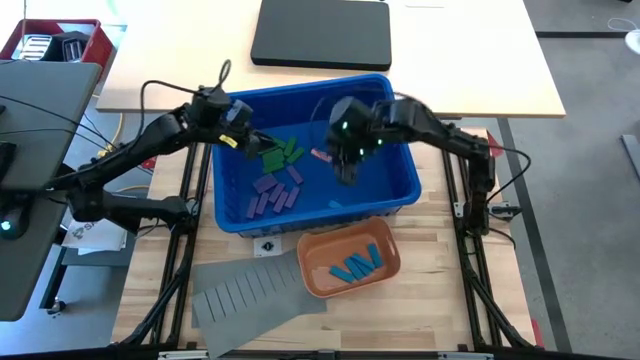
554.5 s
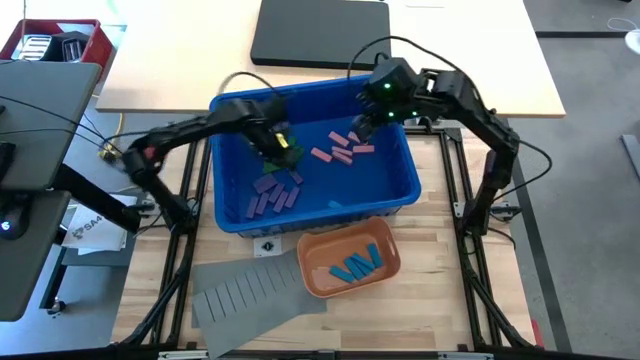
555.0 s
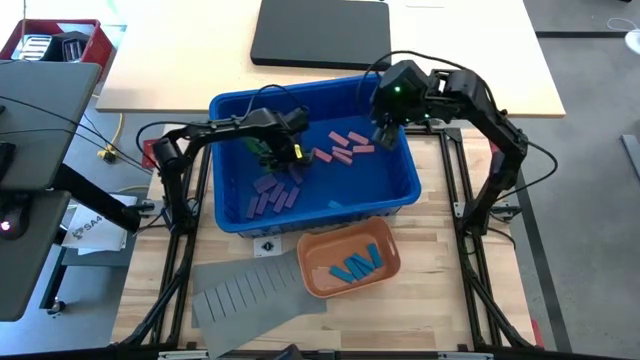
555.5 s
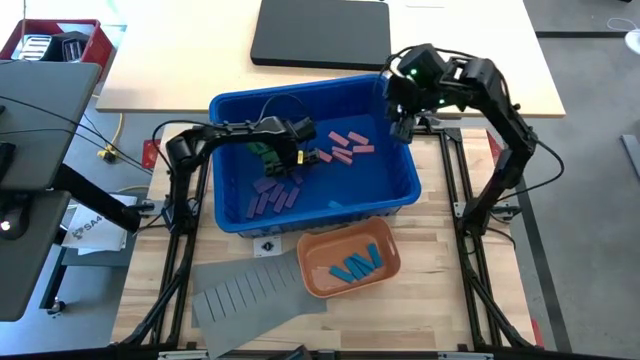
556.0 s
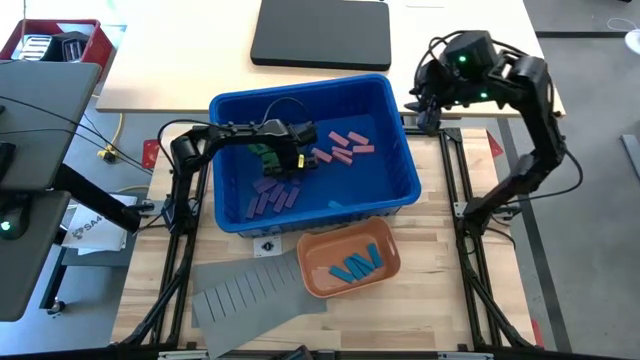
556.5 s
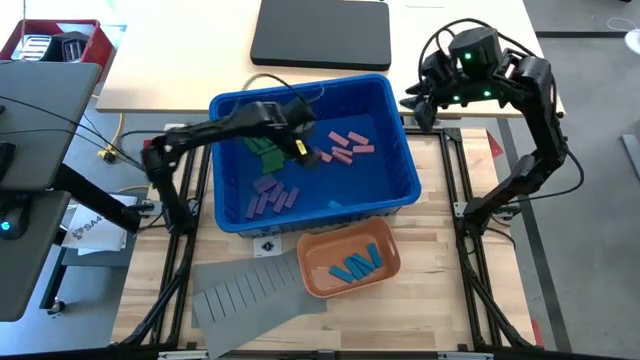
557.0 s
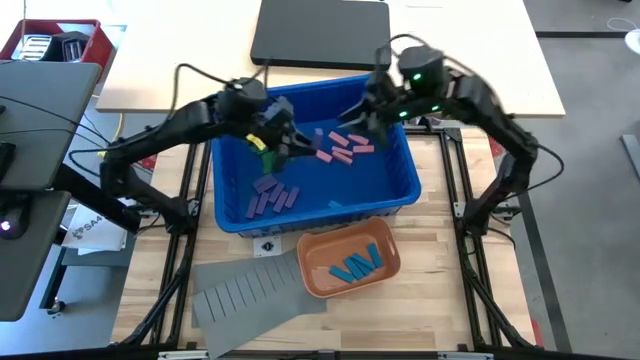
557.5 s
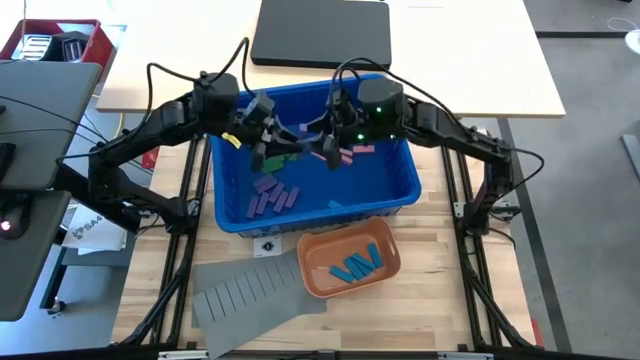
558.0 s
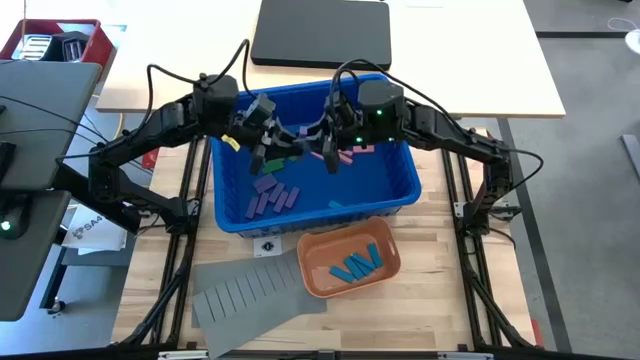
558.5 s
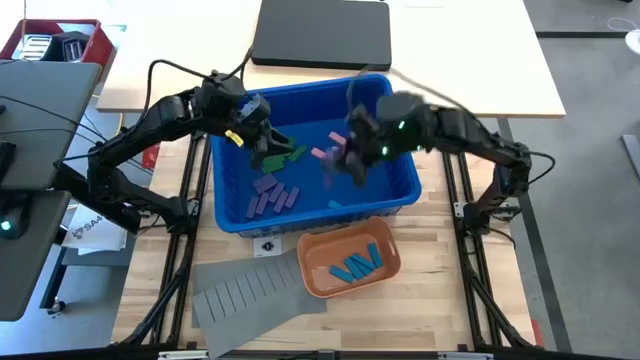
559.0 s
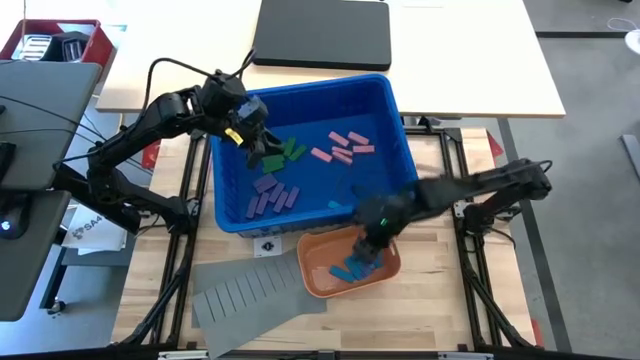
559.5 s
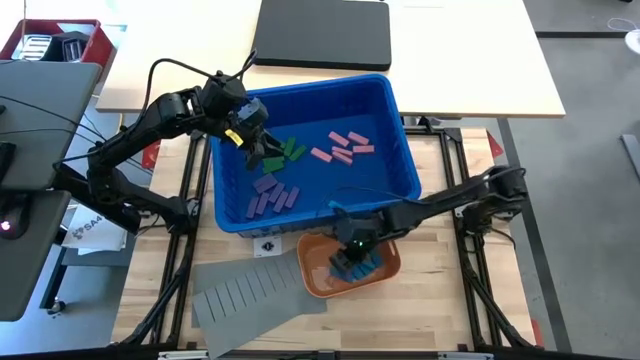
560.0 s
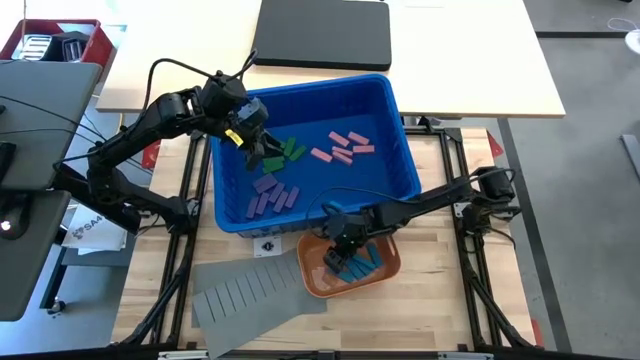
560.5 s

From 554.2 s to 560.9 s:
Task: Sort blocks
Put the purple block into the orange bin

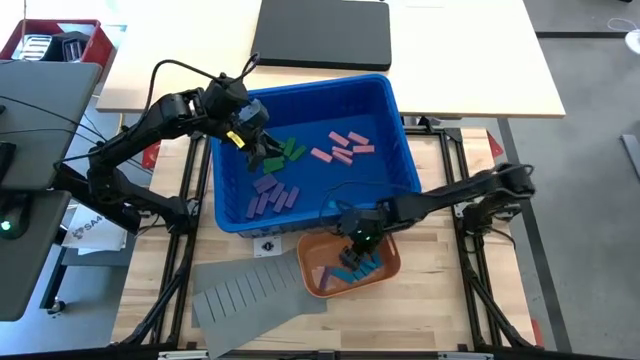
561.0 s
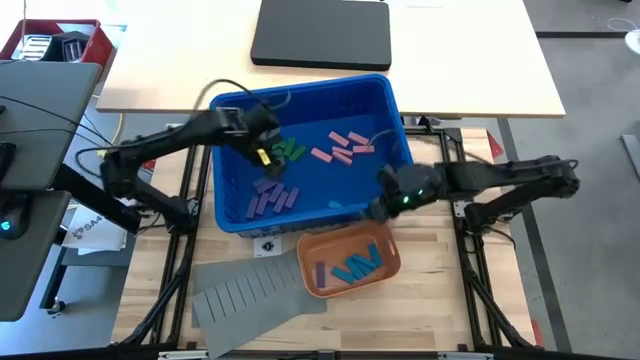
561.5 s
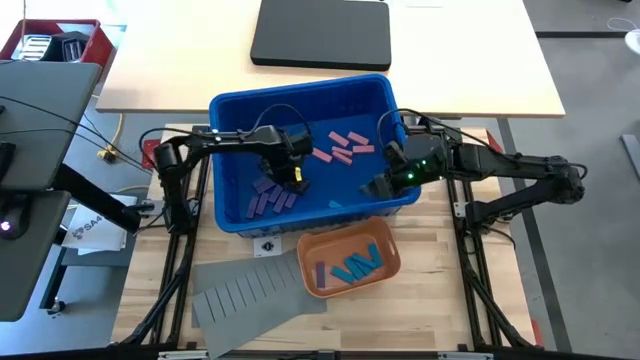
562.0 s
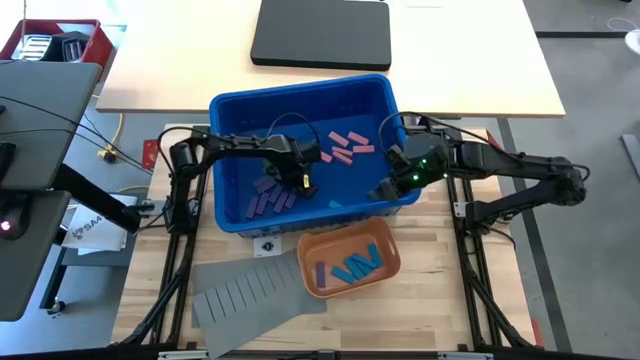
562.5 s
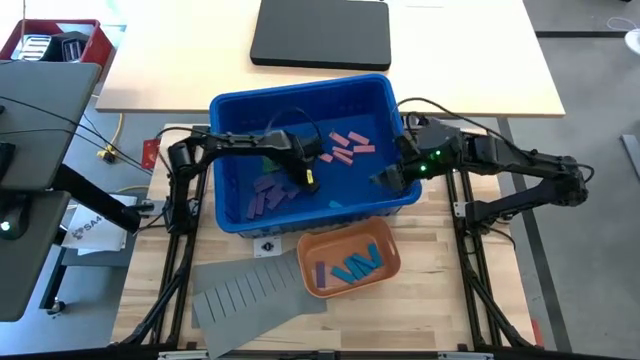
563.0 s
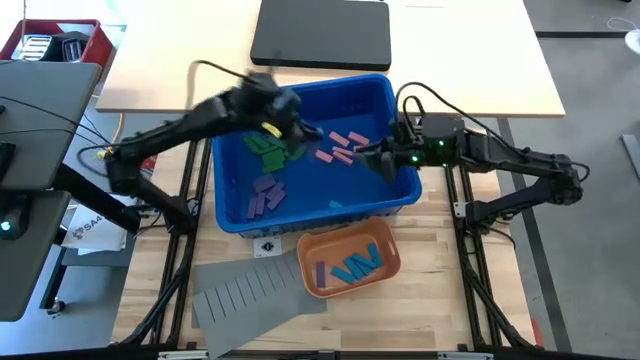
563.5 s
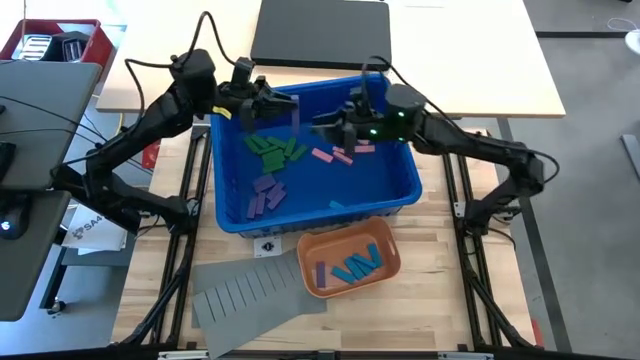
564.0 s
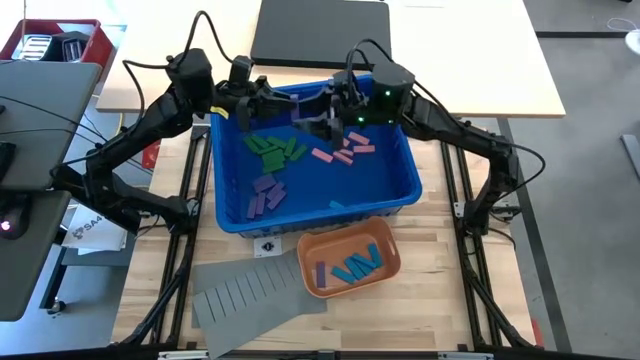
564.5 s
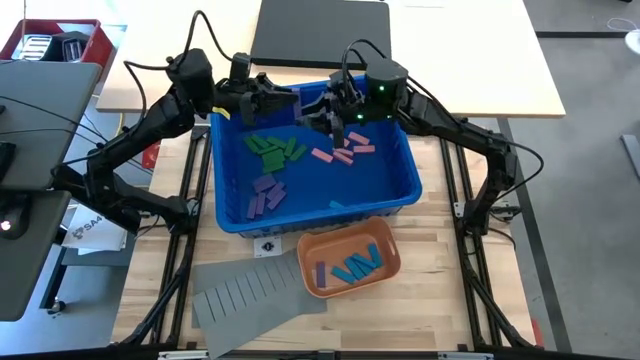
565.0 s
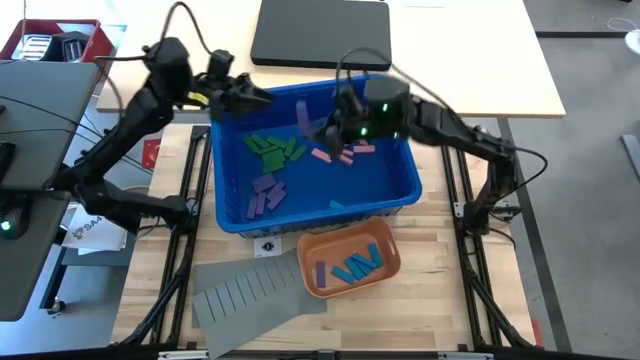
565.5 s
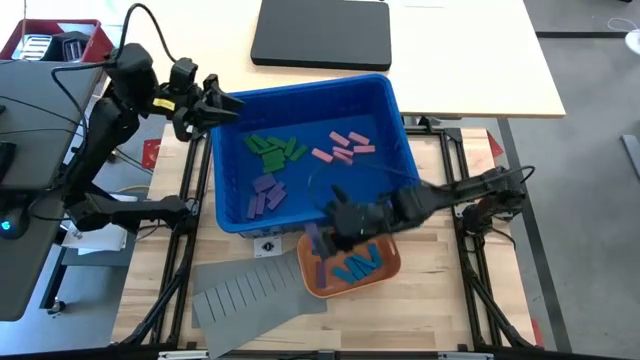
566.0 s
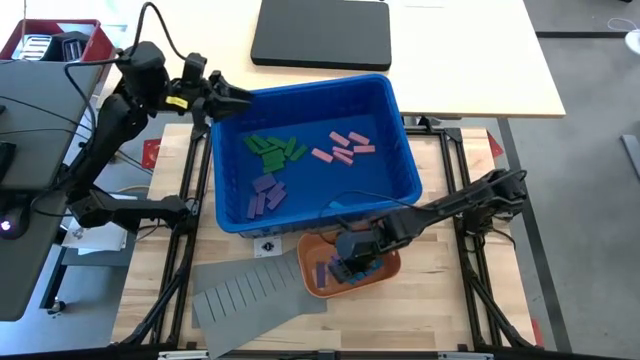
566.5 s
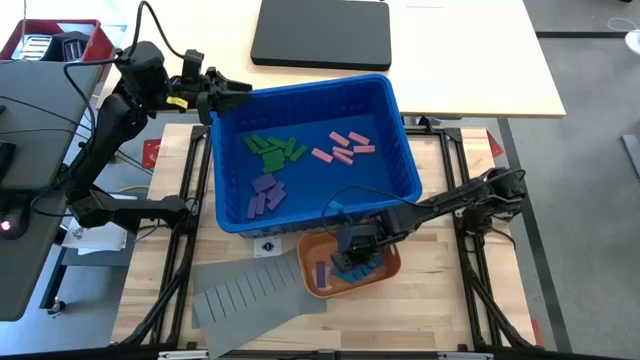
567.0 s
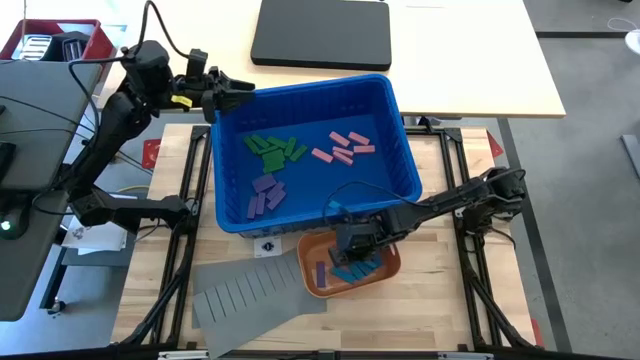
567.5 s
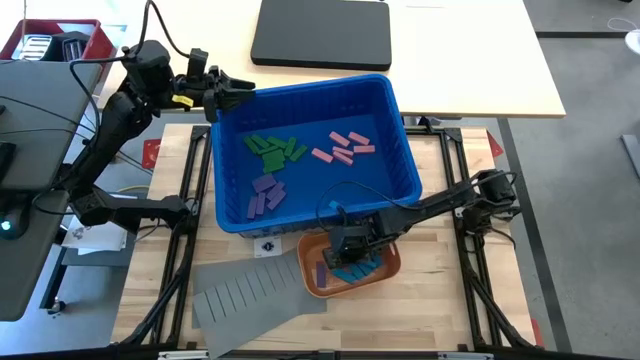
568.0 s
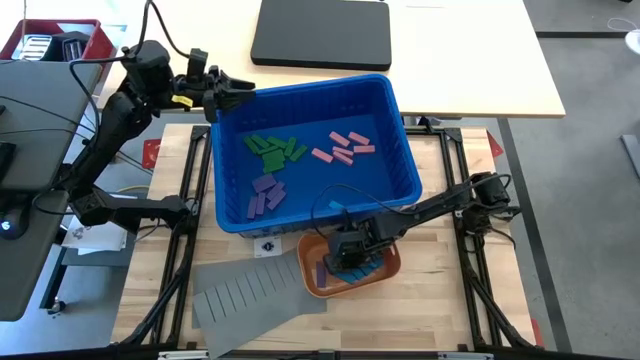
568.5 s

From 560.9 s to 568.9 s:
Put the purple block into the orange bin

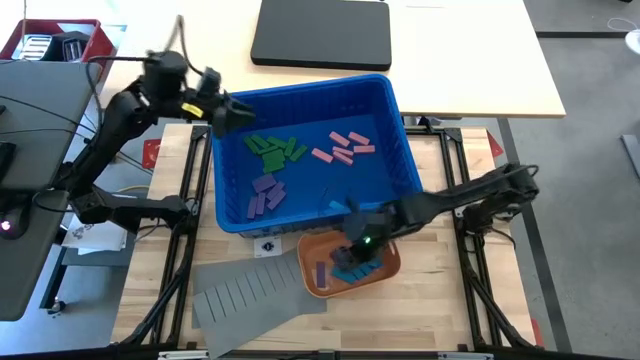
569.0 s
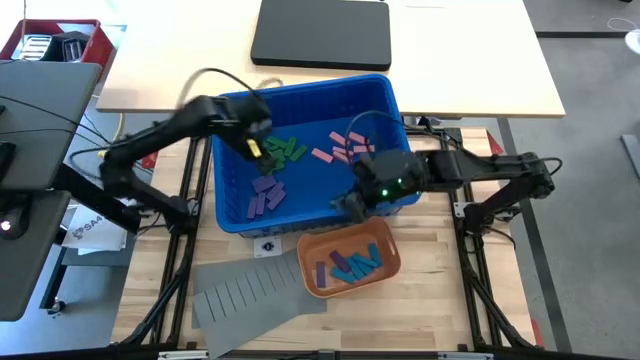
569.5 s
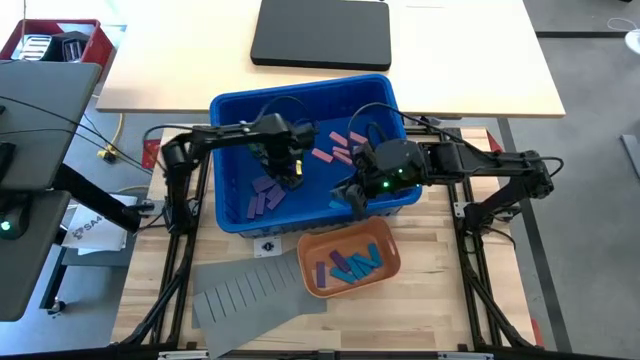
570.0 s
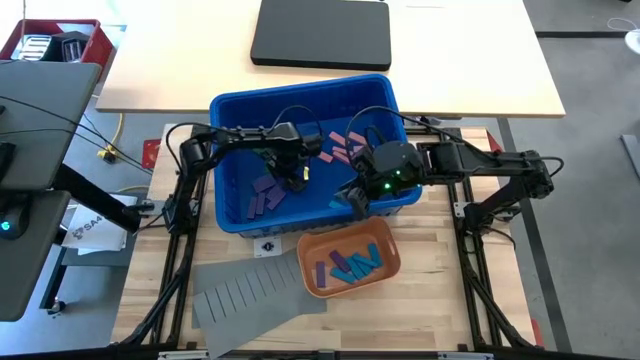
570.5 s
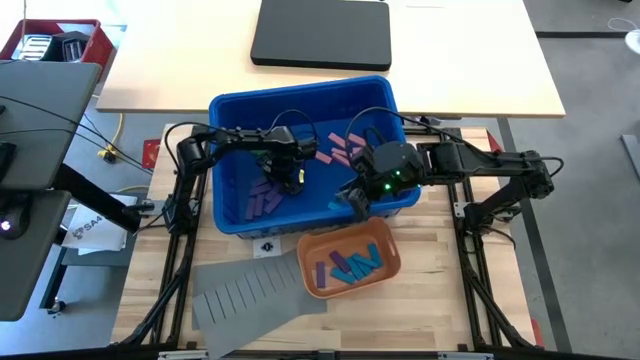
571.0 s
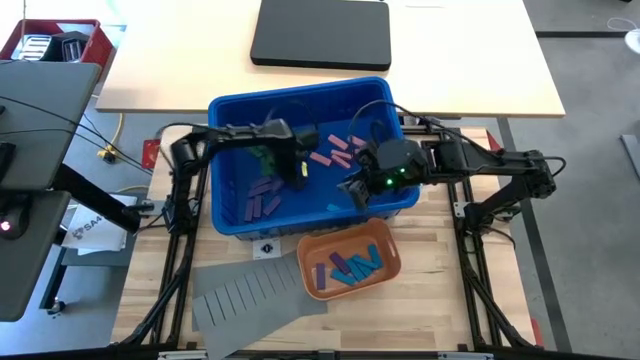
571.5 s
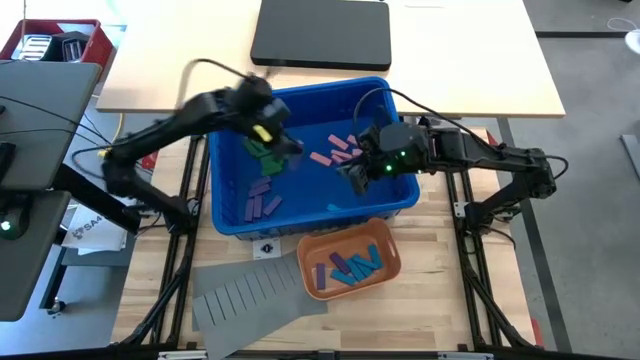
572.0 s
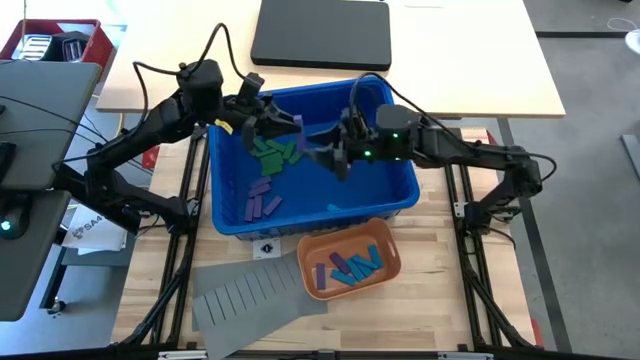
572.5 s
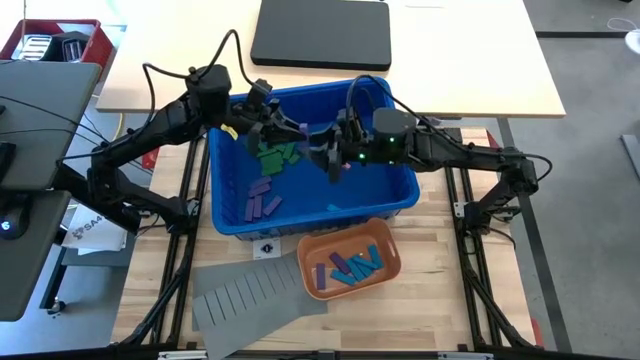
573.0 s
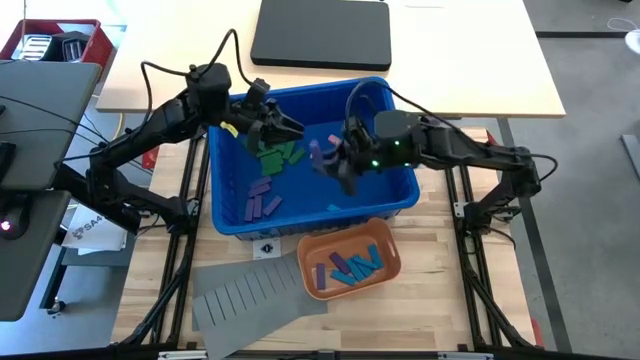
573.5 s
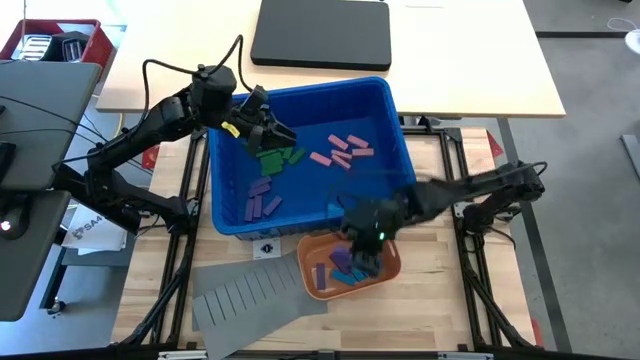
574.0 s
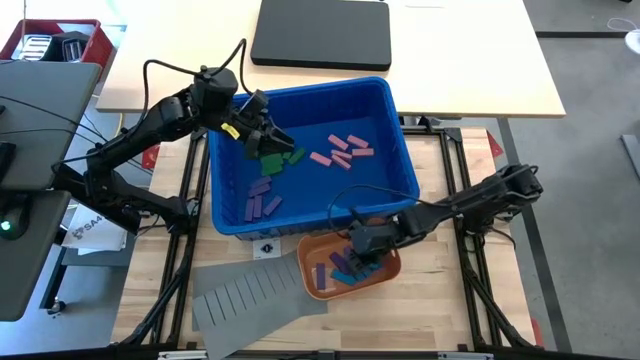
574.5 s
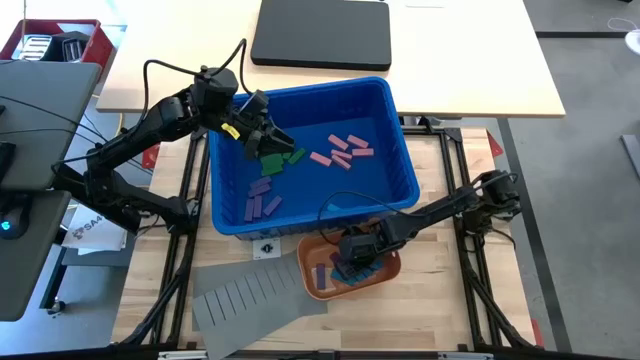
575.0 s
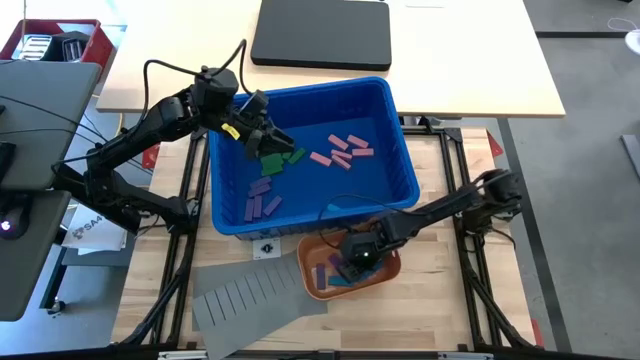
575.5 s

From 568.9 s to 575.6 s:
Put the purple block into the orange bin
